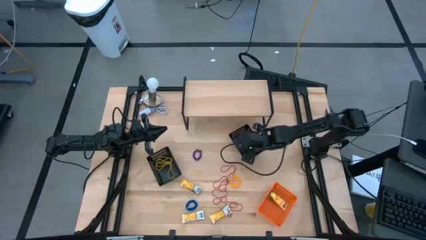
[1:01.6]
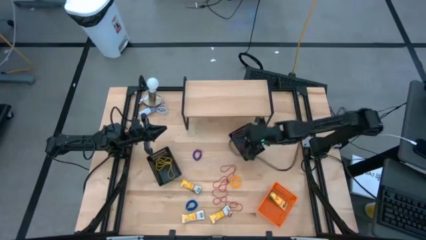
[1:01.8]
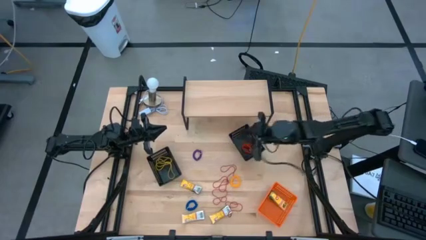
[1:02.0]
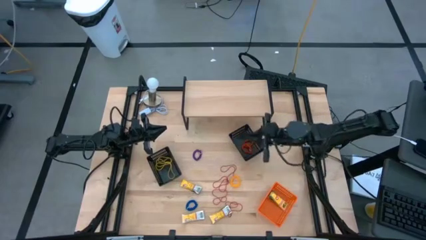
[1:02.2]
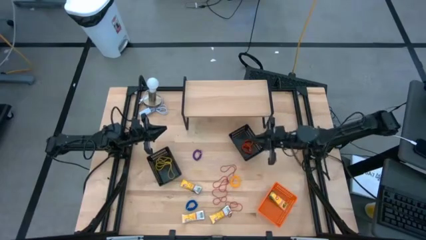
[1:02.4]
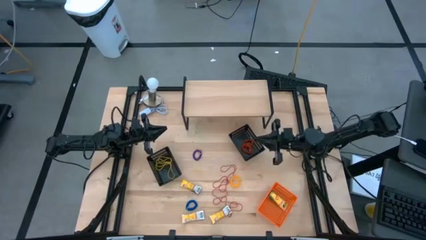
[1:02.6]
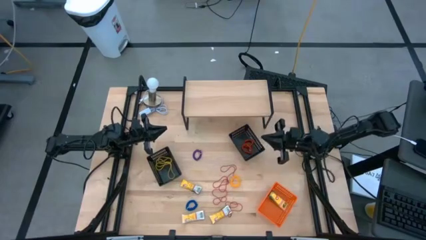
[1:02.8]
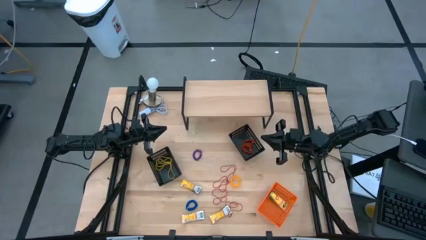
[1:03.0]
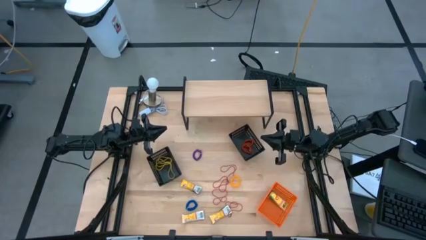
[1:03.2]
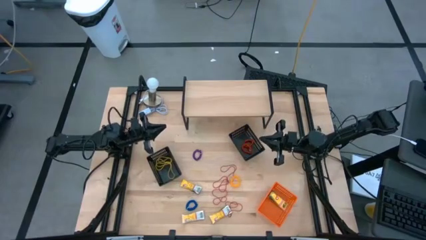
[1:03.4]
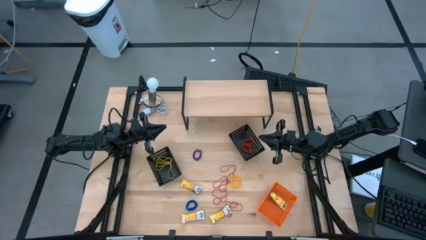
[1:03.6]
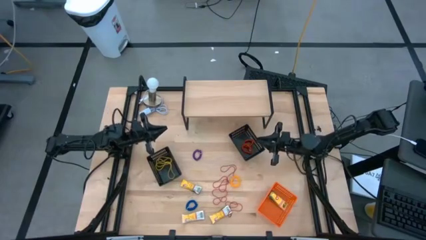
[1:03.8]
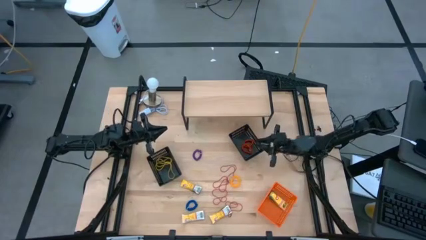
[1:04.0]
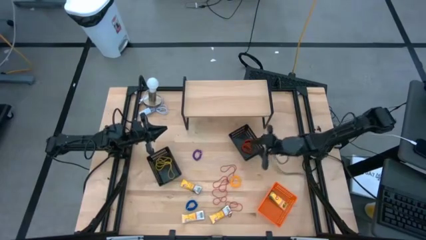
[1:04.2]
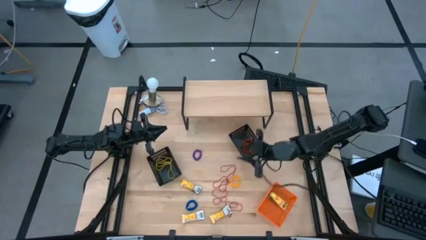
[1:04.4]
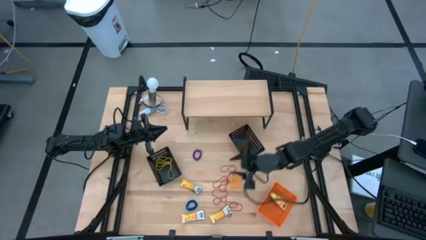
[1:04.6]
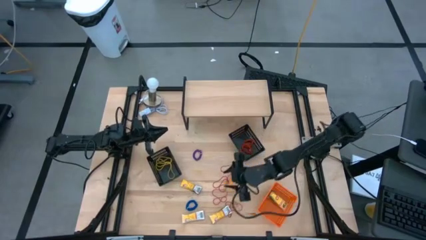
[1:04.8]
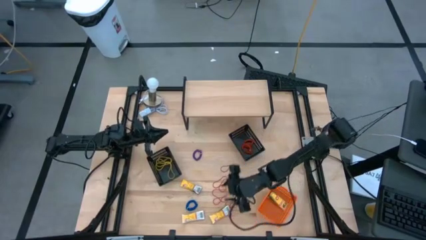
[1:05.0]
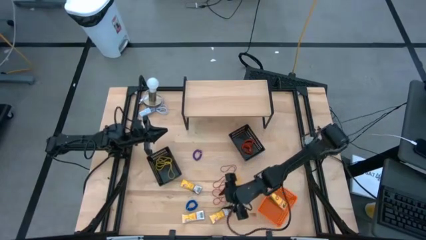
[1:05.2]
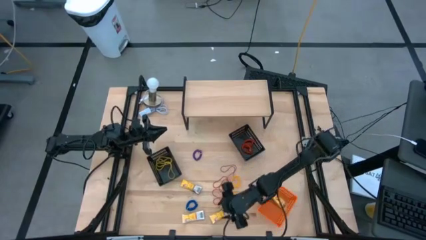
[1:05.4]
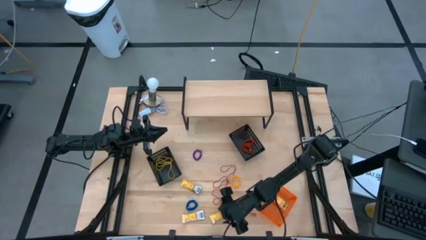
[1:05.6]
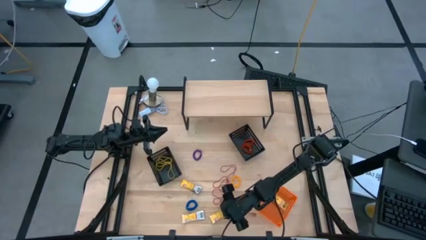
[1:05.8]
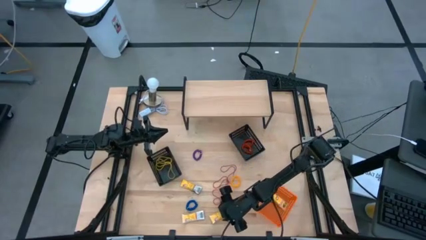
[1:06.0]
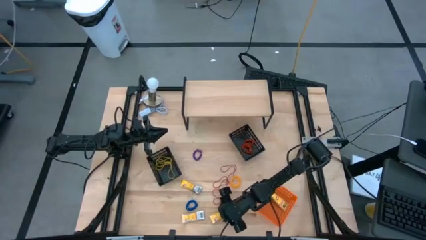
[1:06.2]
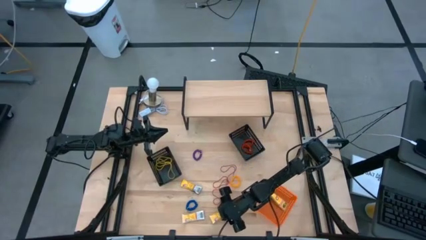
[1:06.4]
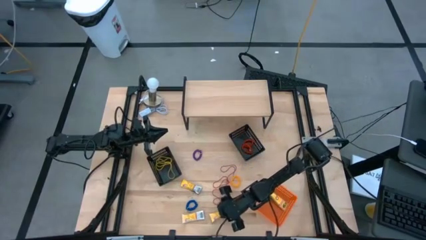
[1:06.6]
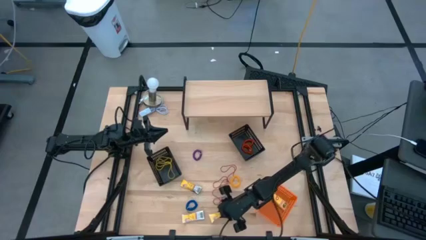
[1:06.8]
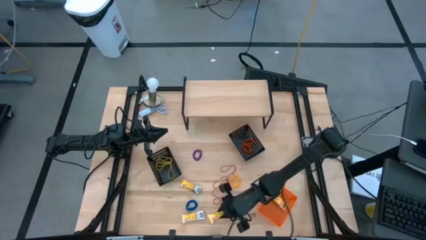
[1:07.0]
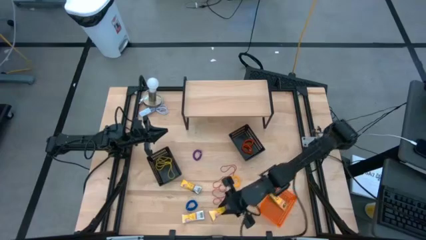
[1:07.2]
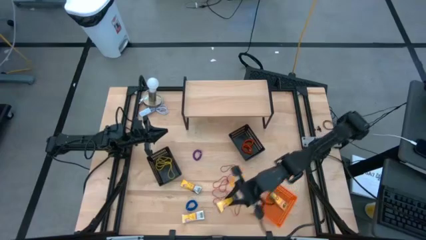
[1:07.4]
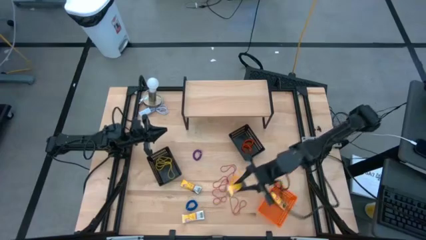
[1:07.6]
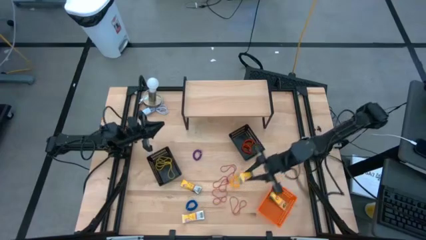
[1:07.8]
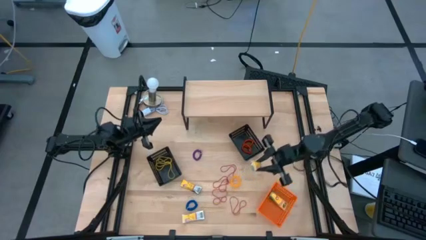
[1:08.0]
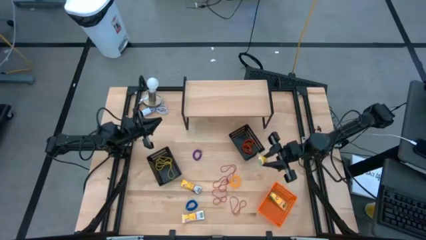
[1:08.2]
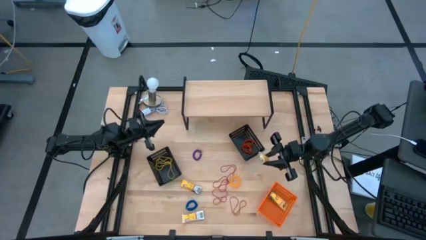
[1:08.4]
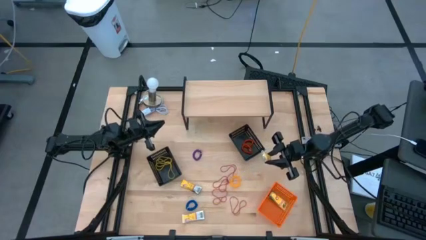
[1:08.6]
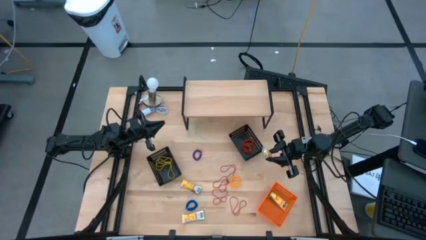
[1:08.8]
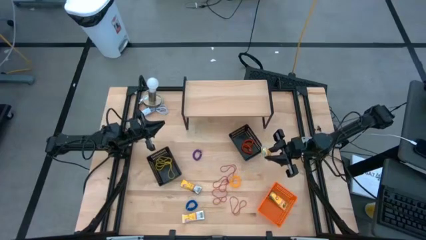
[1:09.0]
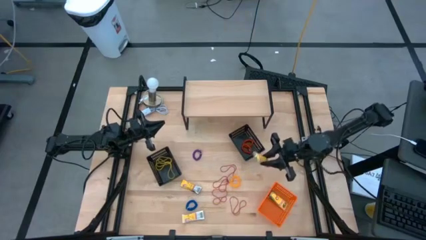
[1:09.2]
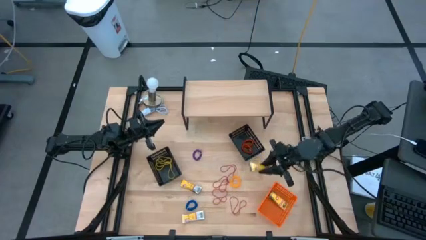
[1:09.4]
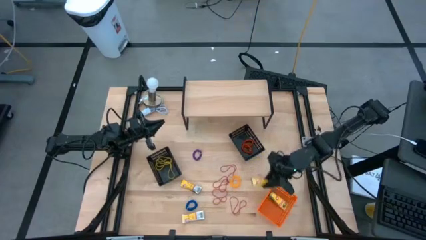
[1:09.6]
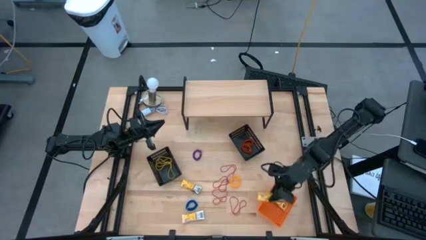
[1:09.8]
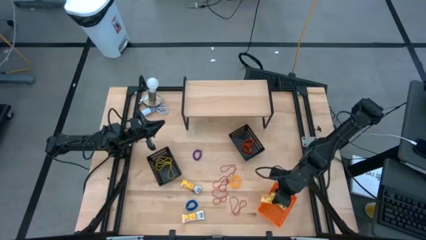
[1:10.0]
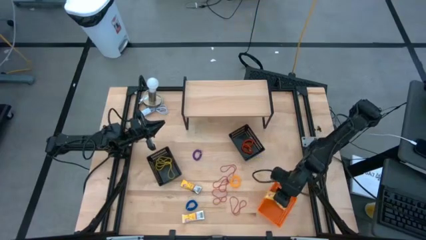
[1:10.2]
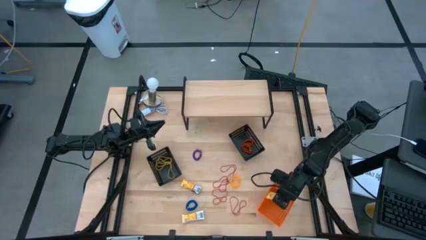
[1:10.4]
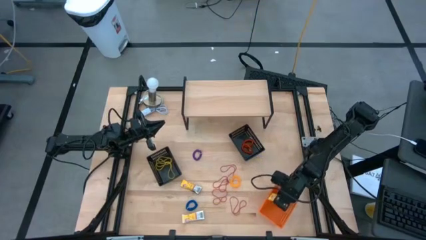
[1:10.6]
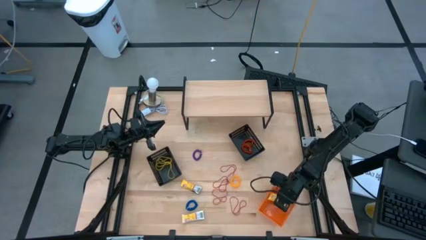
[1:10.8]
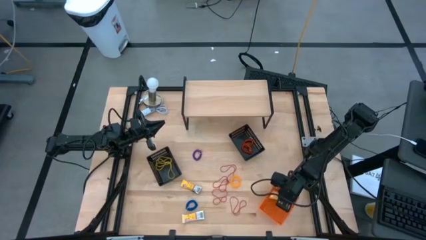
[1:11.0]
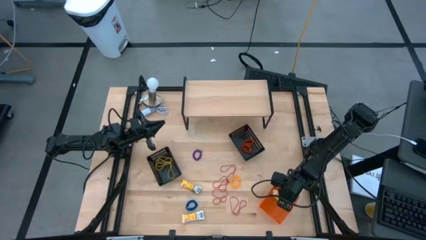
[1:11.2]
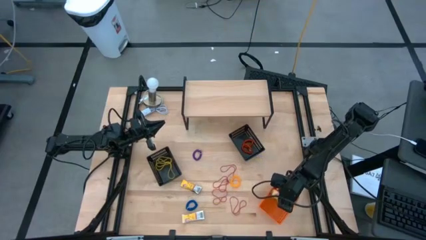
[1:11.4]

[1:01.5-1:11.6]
Task: Pick & Place Office Desk Supplies
Put the yellow crayon box into the orange bin
